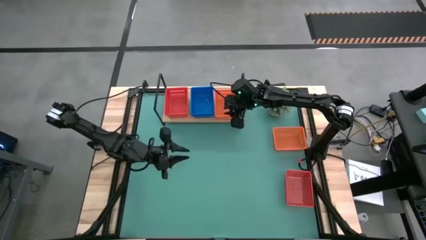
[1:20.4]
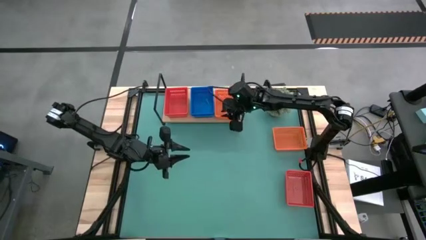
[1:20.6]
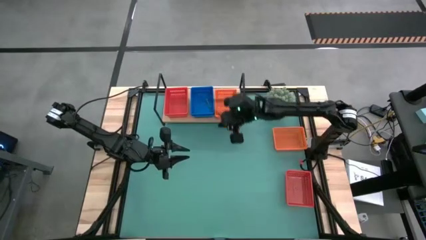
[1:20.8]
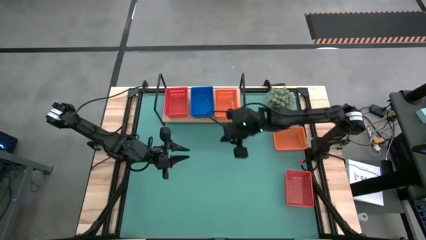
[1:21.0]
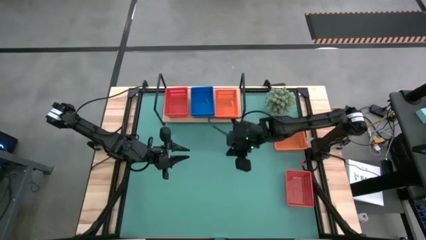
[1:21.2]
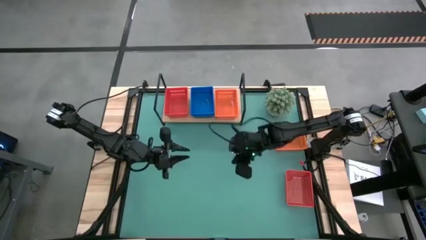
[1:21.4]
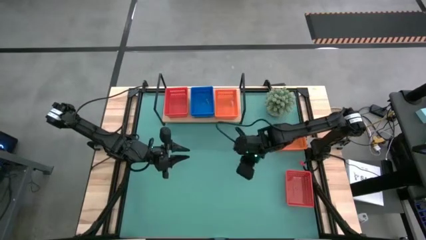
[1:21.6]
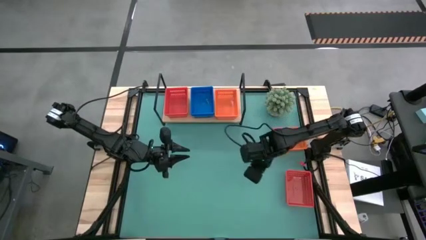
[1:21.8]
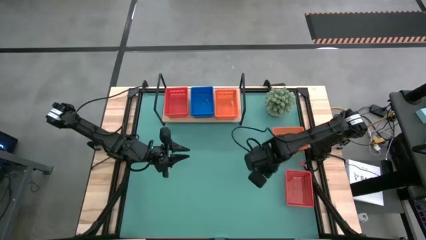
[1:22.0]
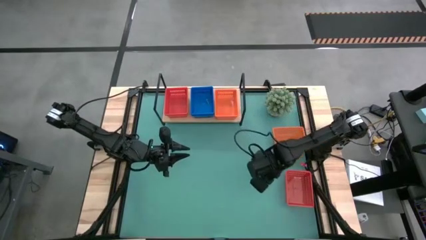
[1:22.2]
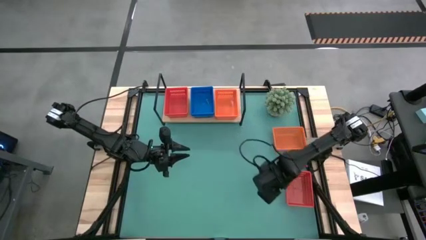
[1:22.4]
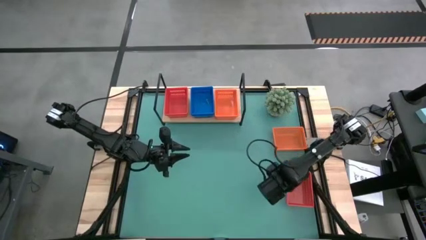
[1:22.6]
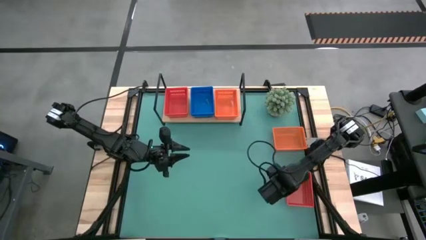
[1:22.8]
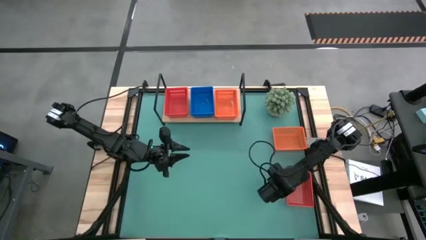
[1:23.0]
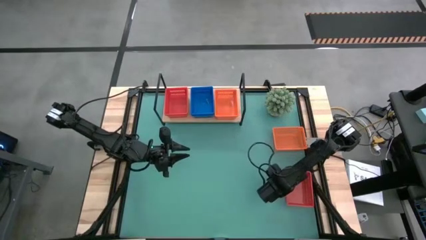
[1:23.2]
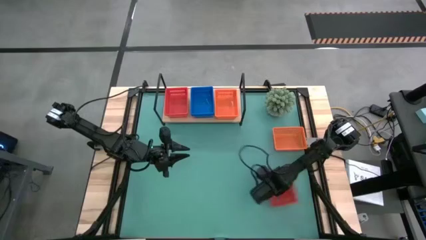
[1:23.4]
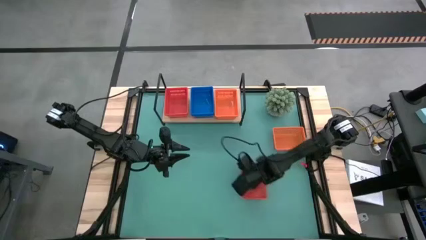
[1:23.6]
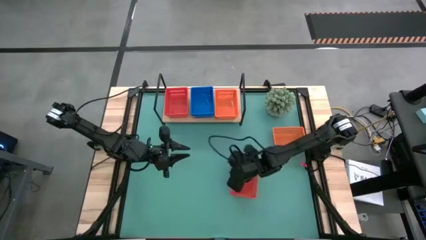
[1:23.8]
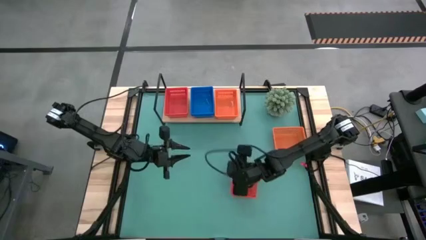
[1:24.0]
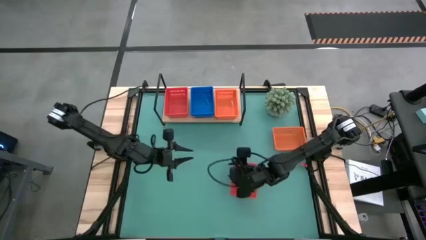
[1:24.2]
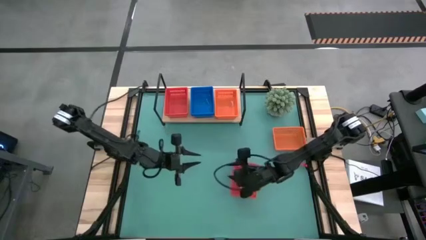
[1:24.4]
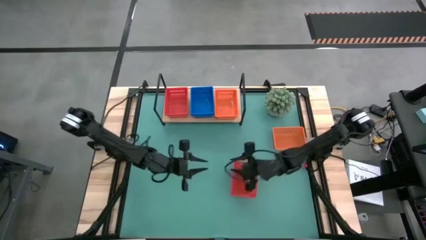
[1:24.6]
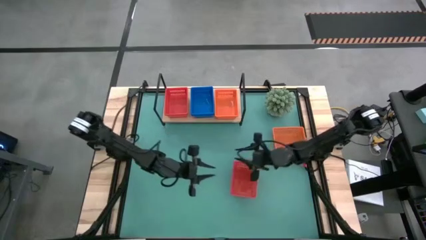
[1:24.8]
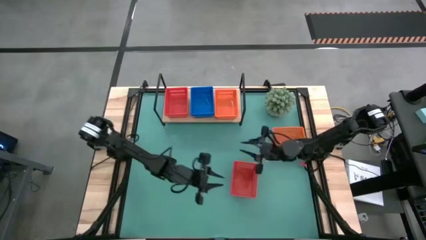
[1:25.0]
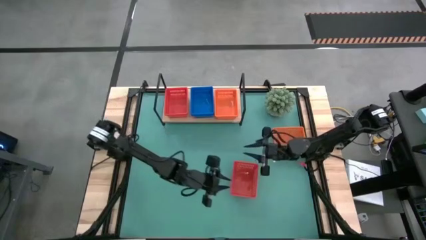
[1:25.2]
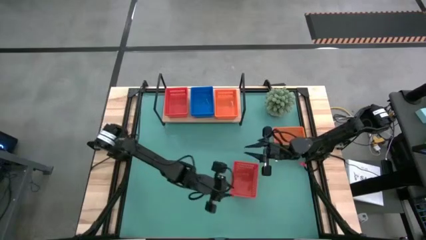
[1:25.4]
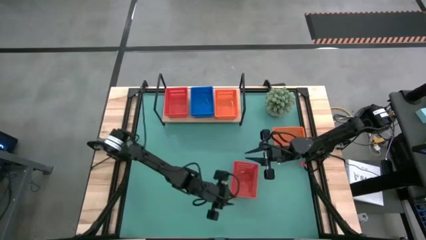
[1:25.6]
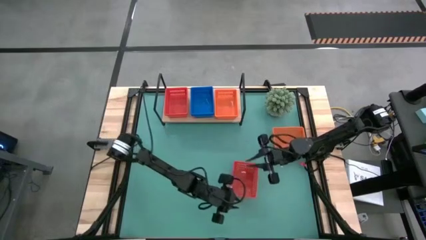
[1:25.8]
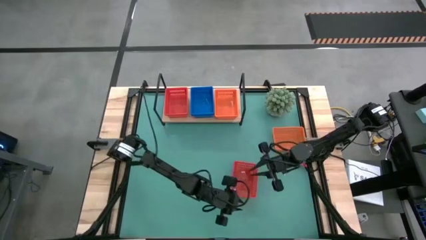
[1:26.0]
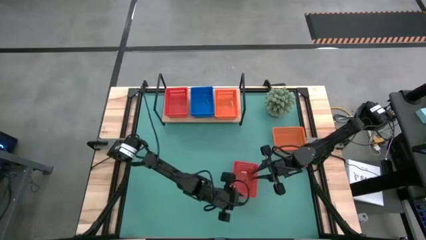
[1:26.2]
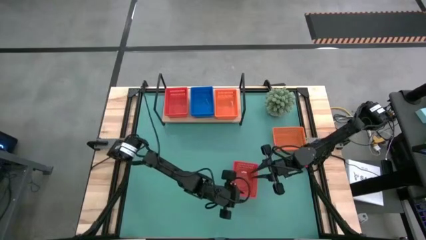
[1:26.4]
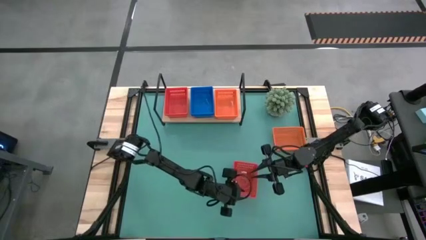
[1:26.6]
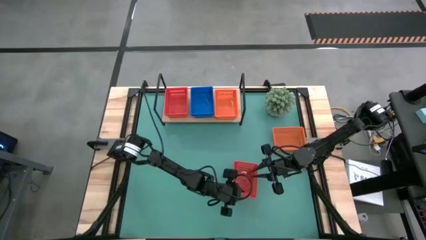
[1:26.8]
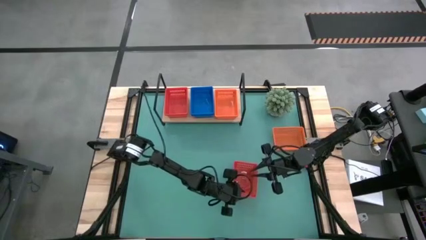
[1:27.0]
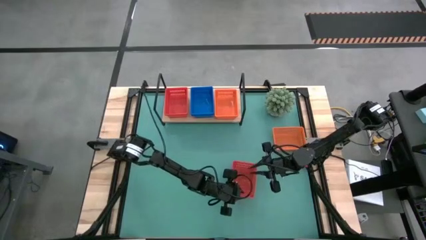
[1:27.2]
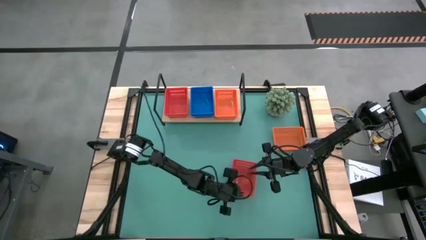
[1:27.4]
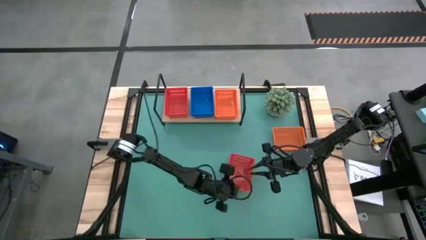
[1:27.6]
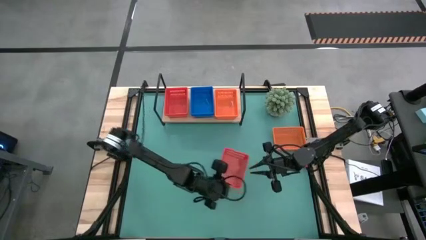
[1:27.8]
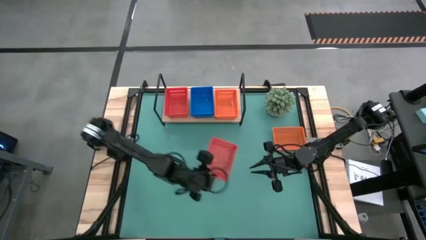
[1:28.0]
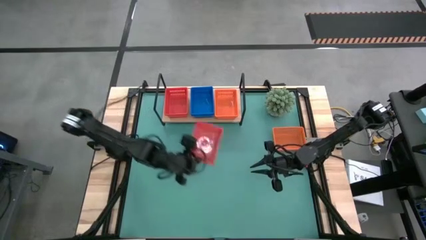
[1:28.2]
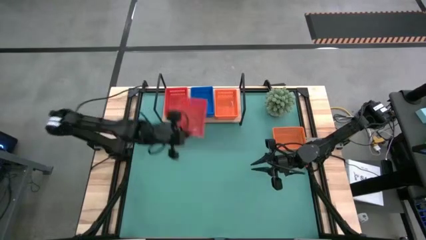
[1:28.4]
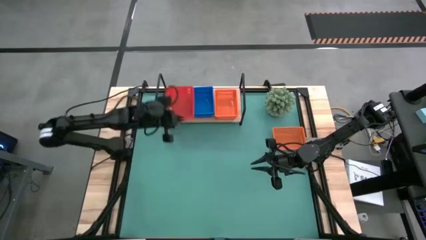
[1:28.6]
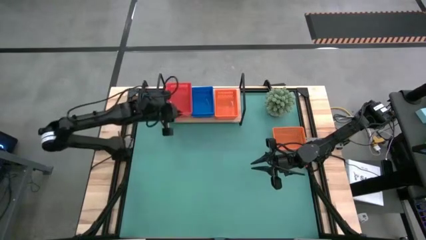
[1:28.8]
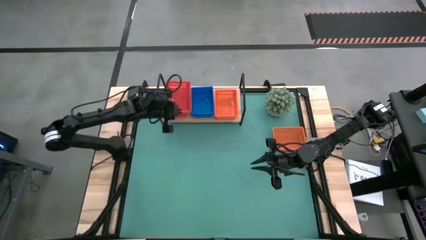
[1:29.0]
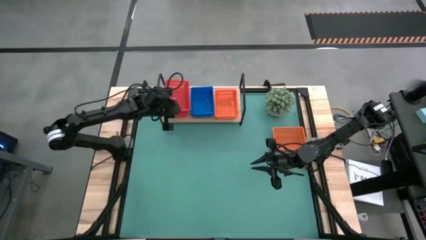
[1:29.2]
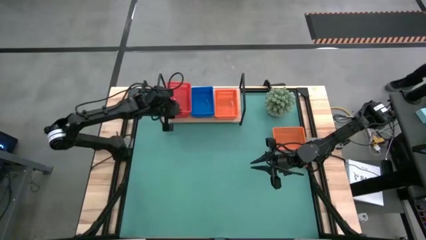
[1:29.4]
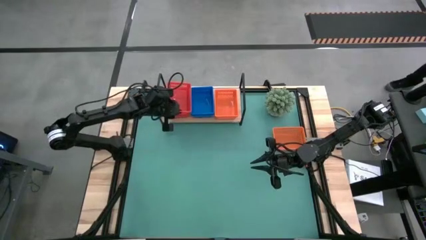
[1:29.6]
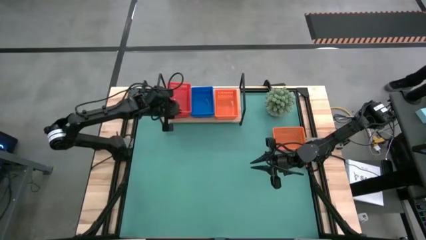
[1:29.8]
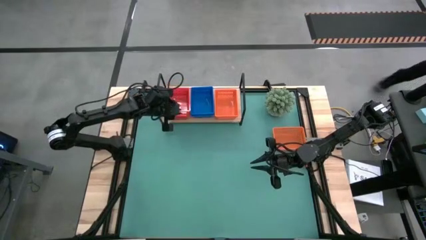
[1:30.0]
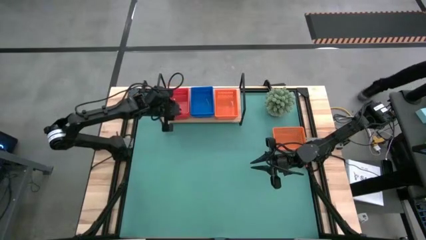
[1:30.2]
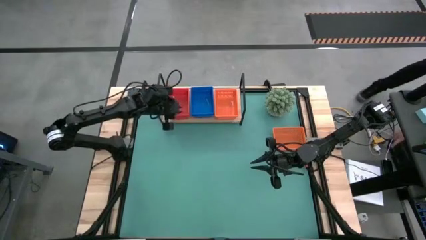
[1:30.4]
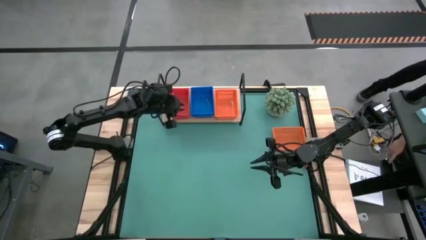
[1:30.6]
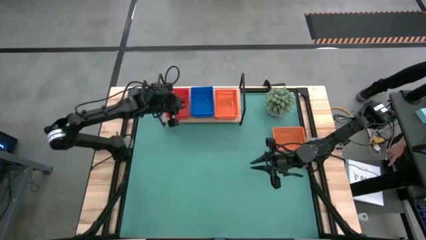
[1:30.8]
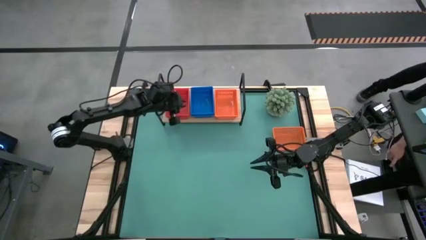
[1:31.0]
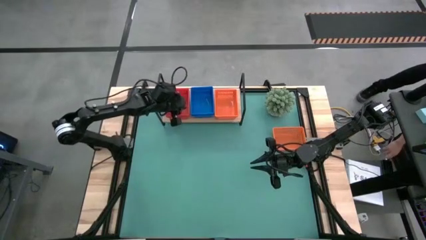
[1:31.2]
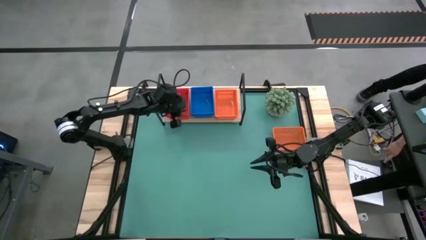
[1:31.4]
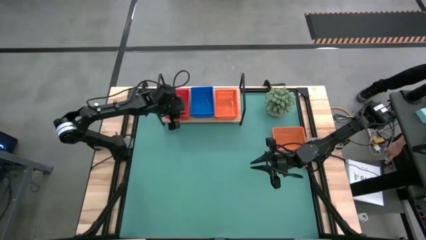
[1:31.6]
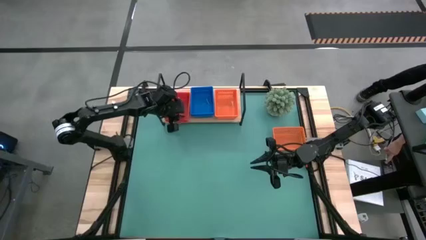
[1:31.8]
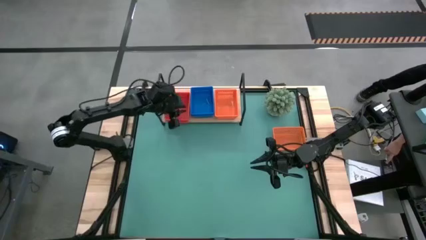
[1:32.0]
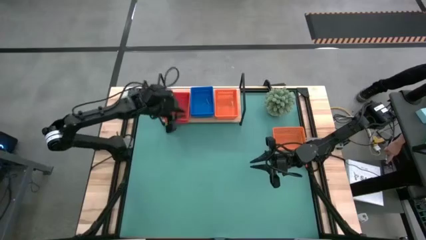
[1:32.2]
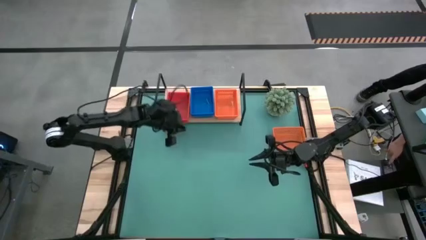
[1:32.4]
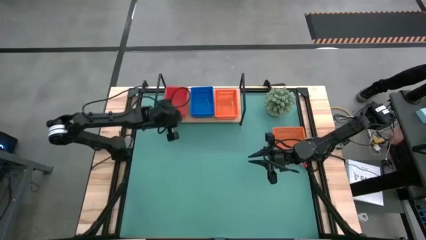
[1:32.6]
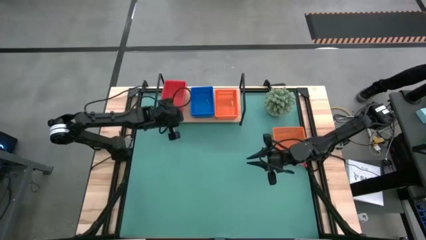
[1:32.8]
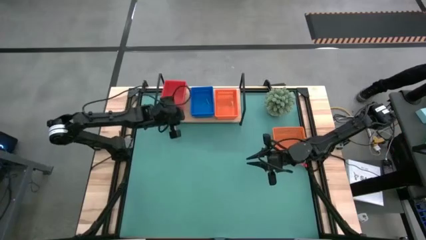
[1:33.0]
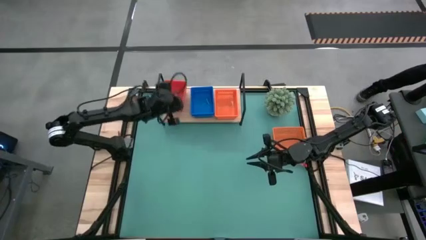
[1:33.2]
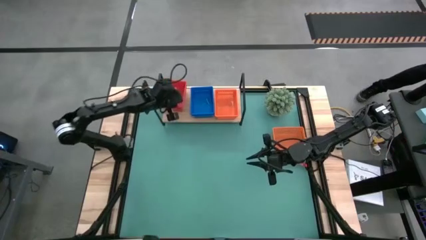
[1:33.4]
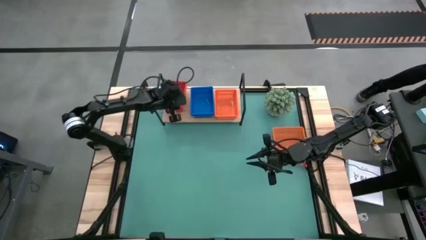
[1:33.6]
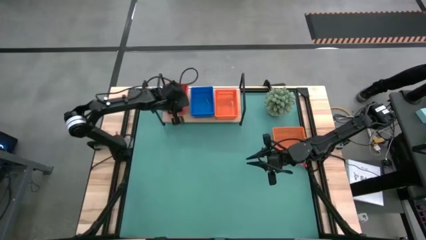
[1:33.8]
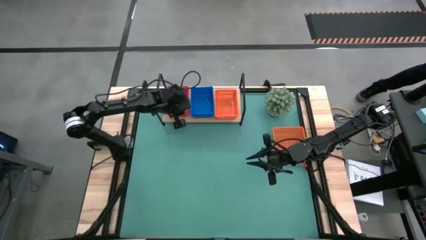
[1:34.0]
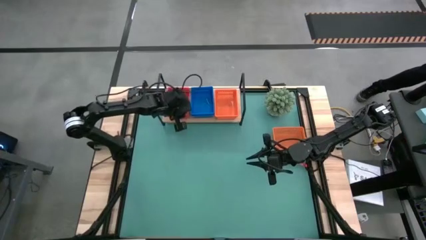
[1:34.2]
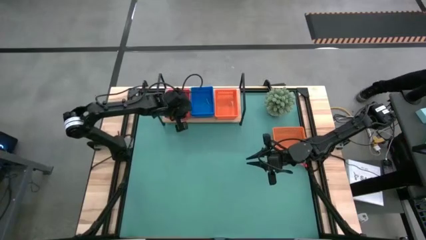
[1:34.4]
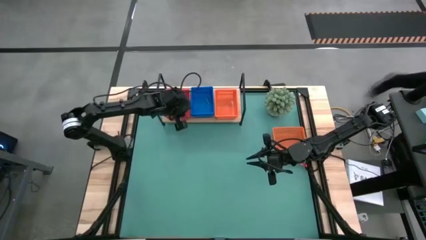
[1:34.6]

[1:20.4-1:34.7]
Task: Stack baskets on shelf by color
Stack the red bin on top of the red bin on the shelf

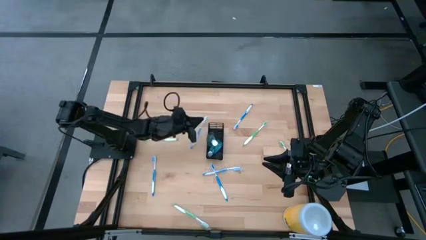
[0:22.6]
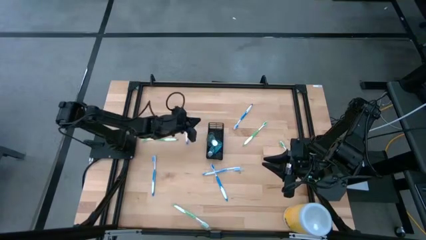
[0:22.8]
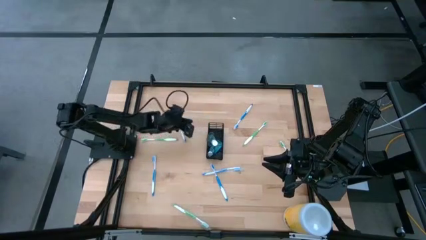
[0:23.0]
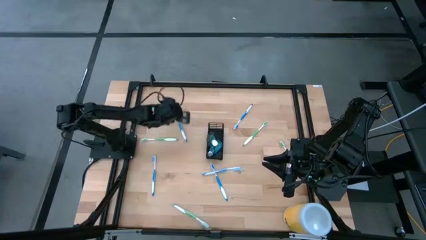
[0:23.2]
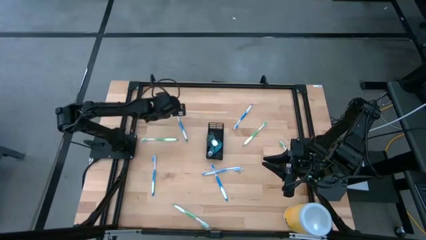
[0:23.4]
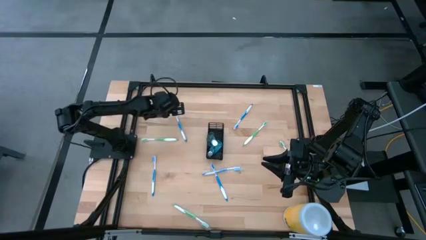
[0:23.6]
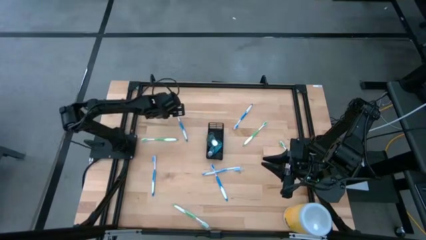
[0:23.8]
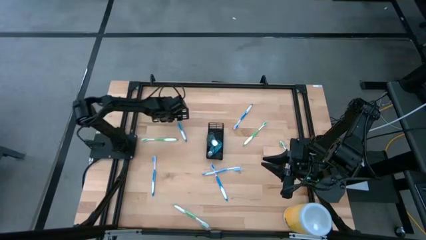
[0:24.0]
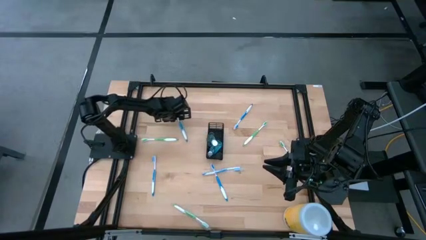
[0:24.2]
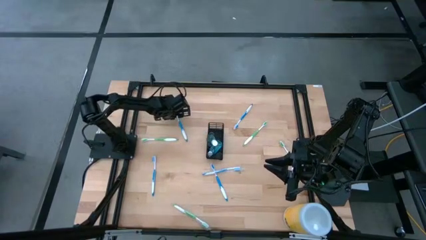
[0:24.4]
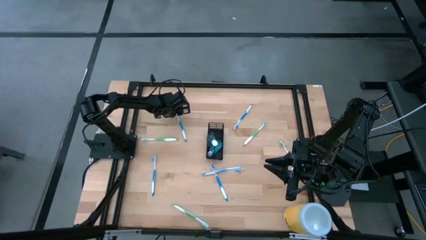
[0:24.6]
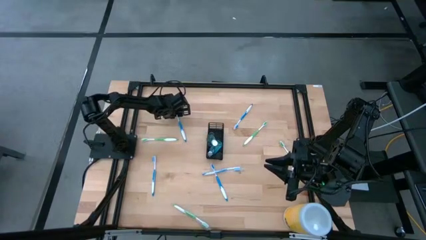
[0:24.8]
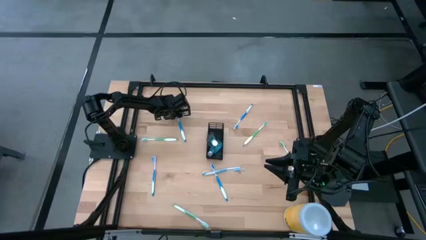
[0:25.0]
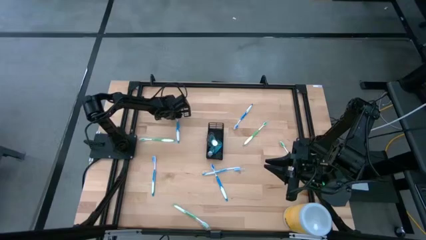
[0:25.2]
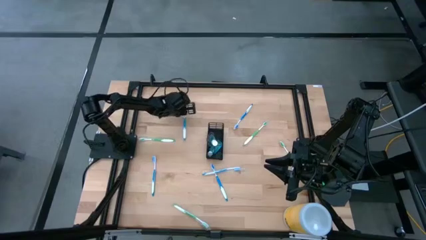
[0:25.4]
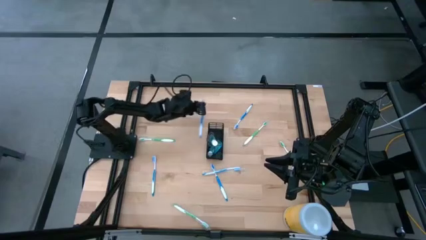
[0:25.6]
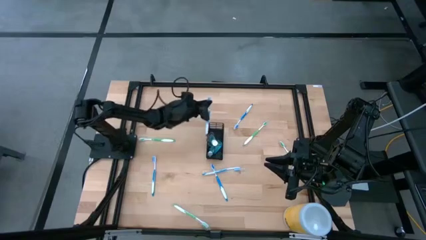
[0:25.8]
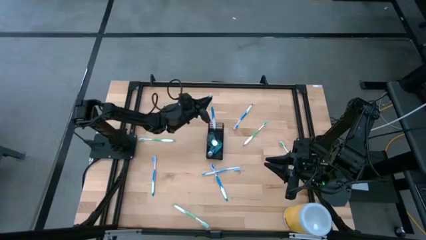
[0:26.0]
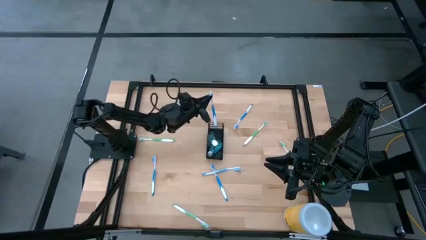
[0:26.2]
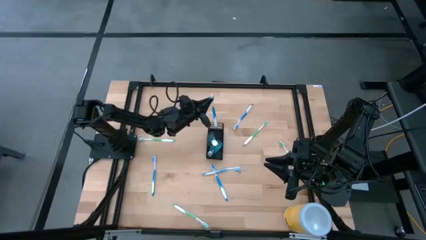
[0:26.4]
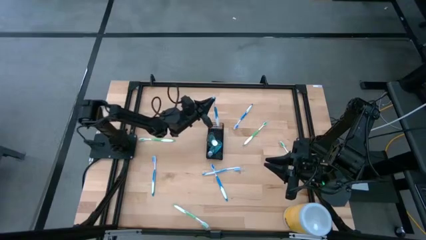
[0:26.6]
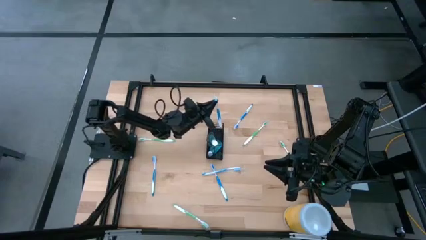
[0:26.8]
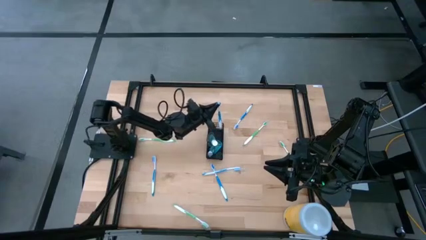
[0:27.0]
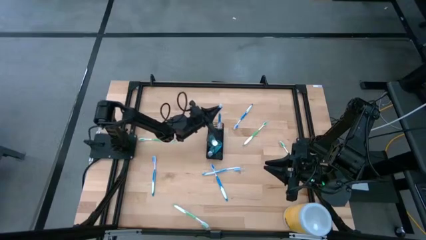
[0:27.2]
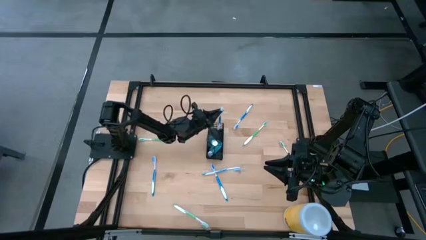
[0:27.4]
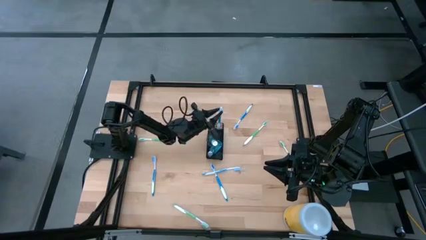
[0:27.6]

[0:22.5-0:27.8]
Task: Pick & Place toothbrushing station
Put the blue toothbrush into the black organizer
